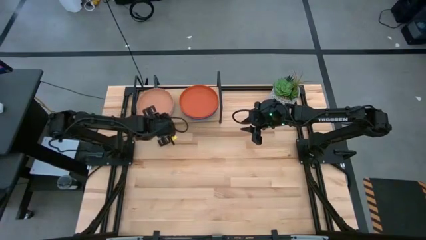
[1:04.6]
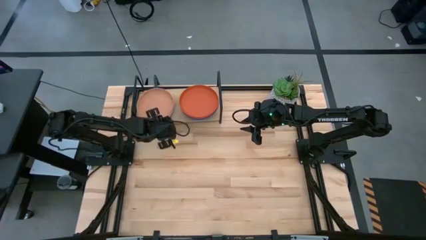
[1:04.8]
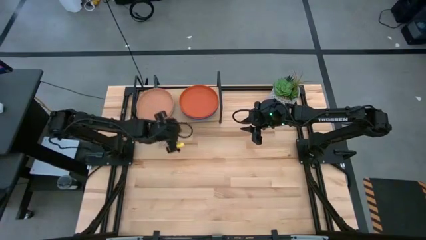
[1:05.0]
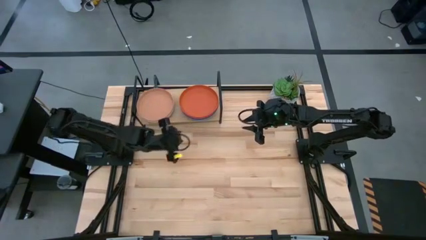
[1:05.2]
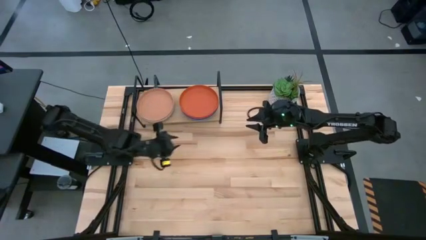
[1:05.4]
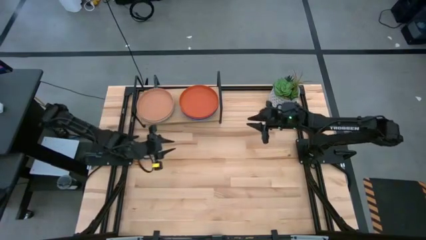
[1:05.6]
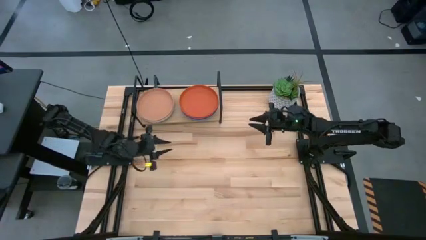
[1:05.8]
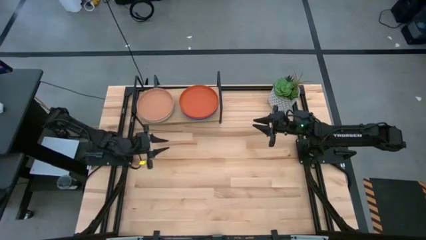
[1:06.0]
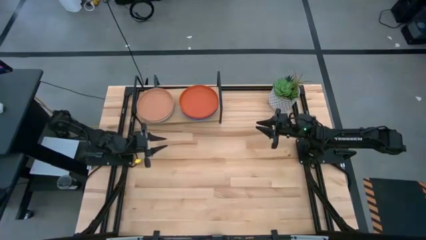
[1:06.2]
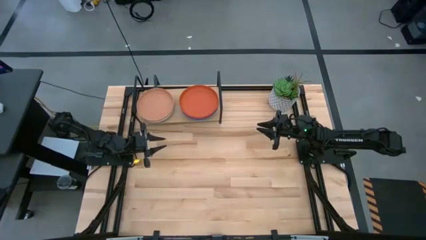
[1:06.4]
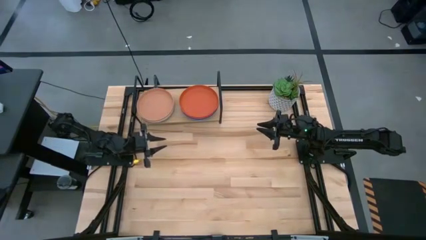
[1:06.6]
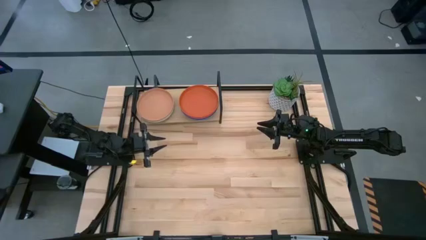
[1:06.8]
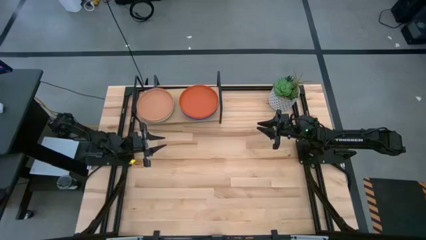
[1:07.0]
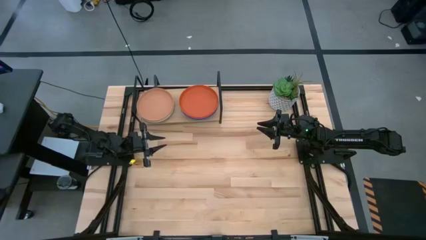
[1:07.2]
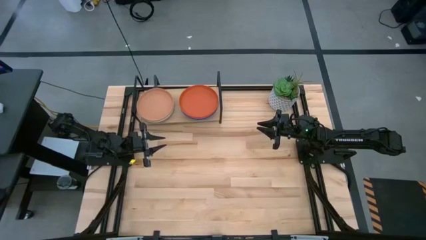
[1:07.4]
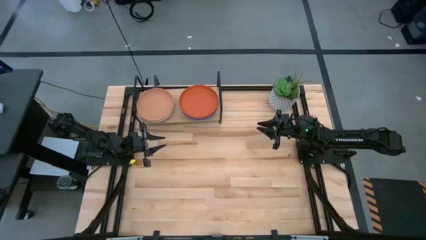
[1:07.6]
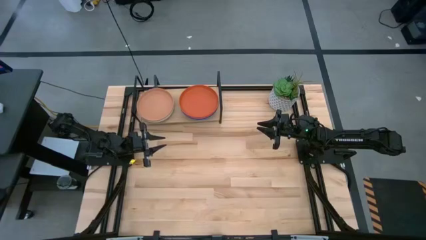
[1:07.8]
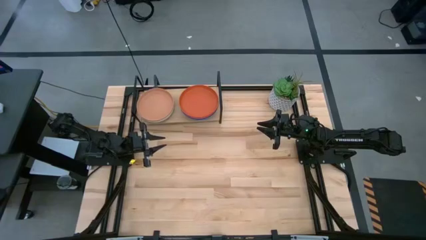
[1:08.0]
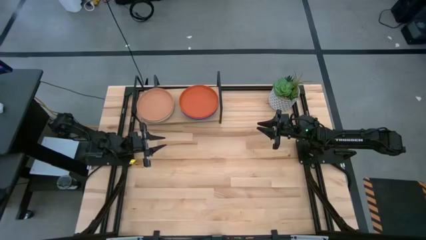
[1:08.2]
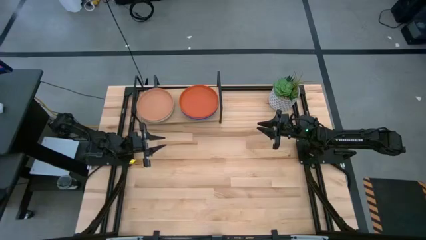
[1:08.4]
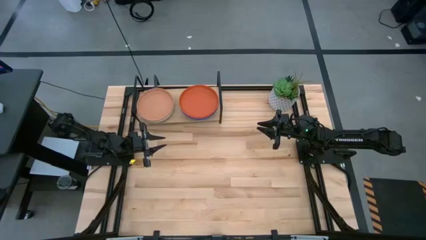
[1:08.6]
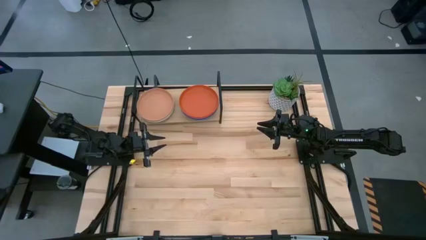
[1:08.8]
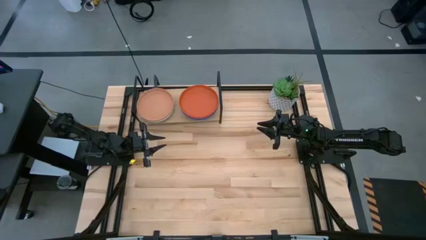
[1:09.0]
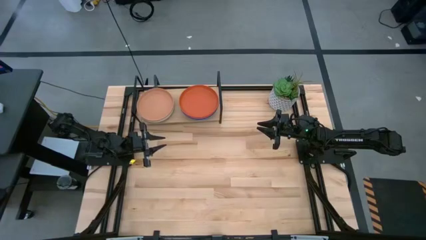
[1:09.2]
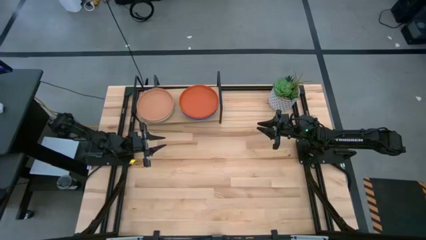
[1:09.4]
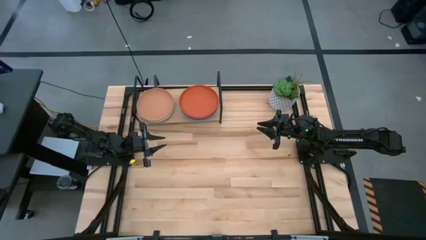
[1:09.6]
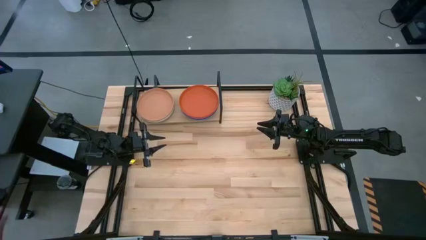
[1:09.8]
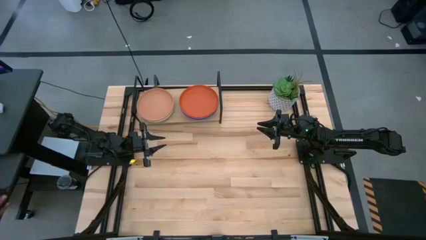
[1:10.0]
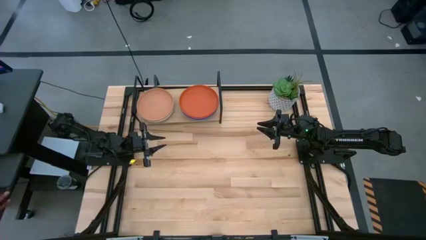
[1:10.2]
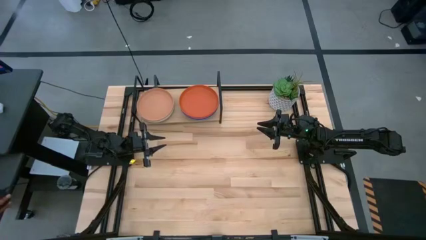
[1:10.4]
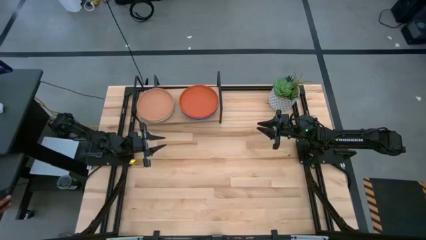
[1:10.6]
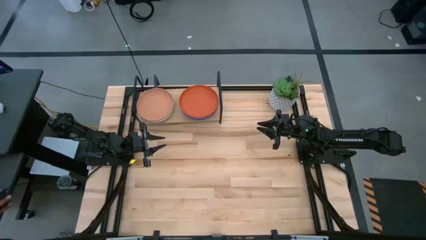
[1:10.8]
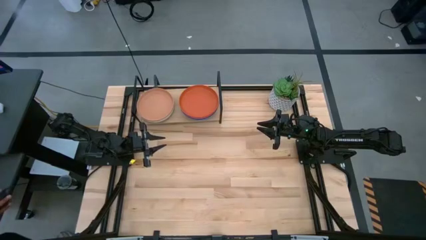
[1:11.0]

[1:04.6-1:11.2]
Task: Place and stack plates onto a shelf
Return to Home Position

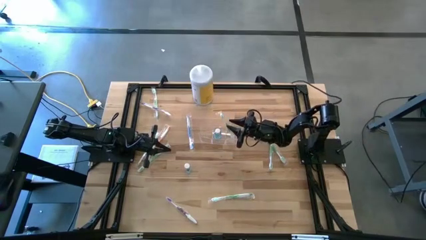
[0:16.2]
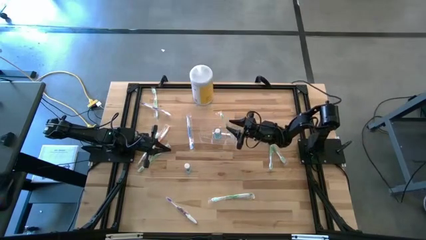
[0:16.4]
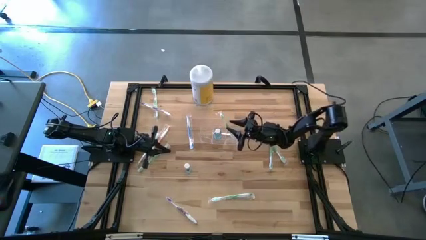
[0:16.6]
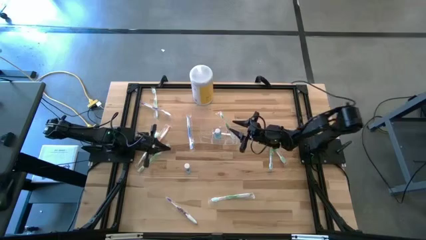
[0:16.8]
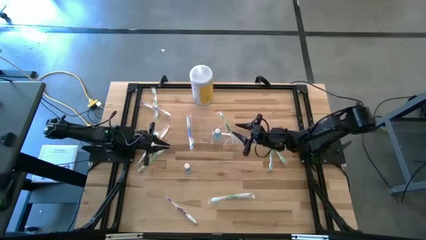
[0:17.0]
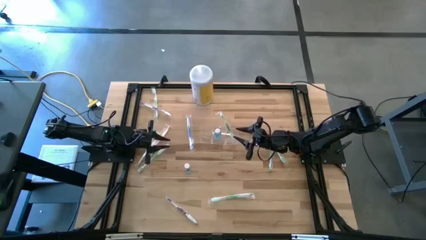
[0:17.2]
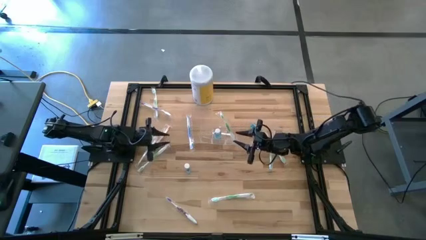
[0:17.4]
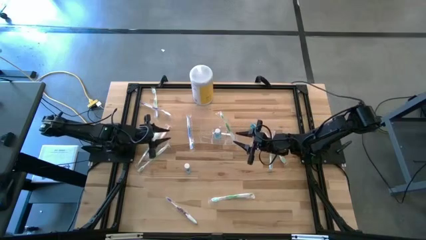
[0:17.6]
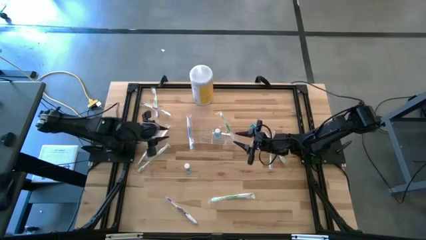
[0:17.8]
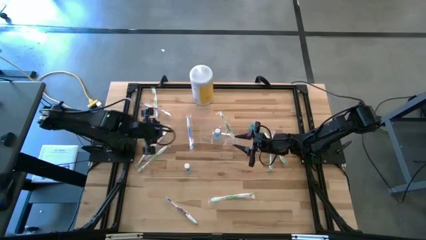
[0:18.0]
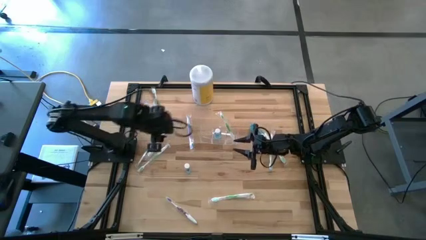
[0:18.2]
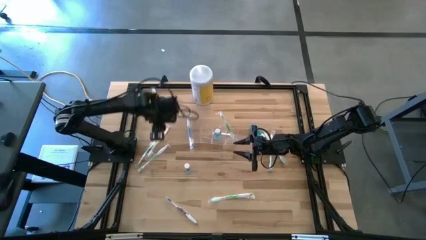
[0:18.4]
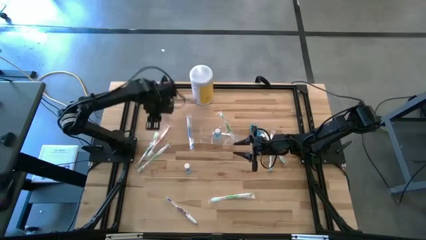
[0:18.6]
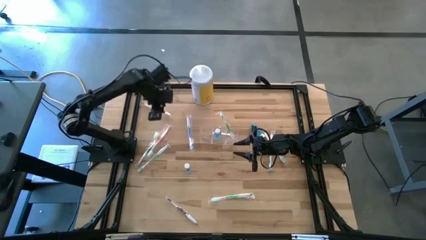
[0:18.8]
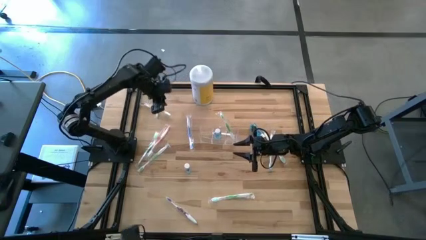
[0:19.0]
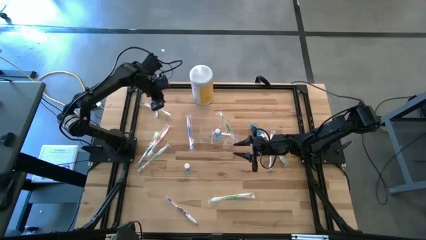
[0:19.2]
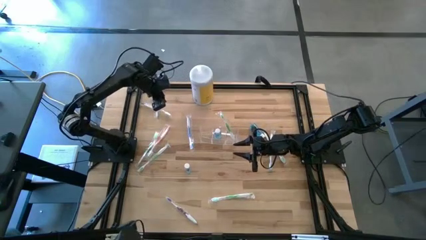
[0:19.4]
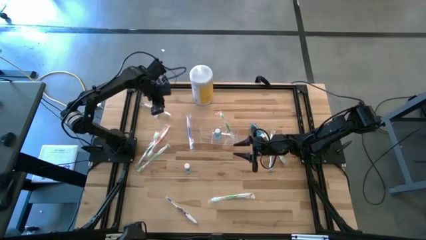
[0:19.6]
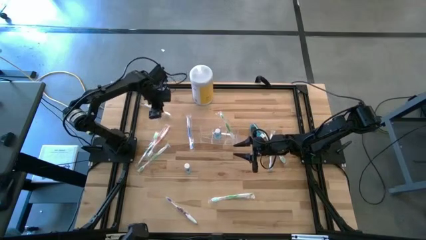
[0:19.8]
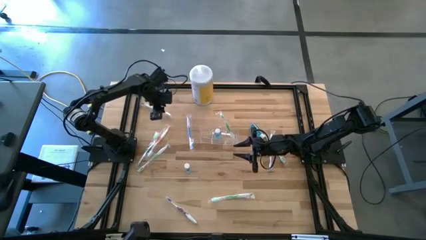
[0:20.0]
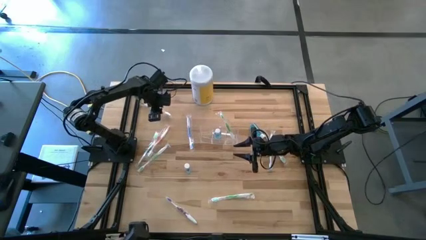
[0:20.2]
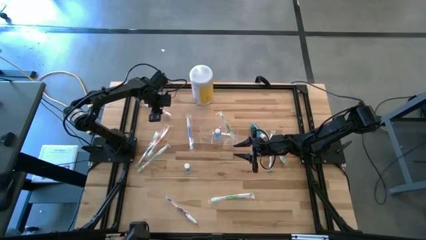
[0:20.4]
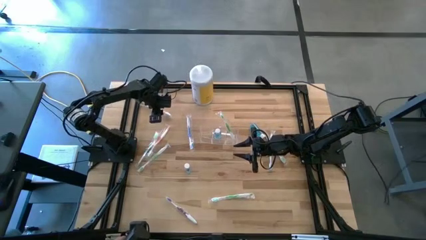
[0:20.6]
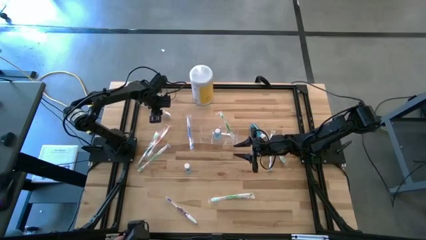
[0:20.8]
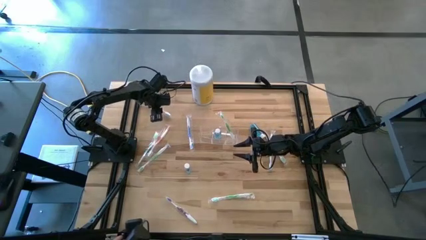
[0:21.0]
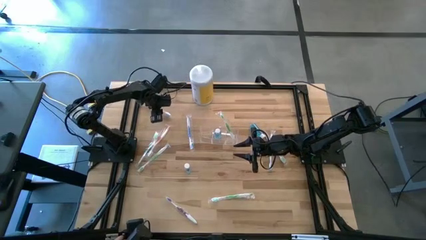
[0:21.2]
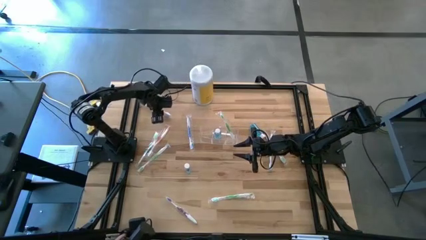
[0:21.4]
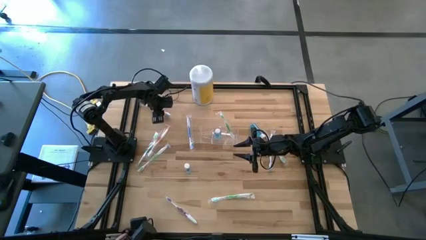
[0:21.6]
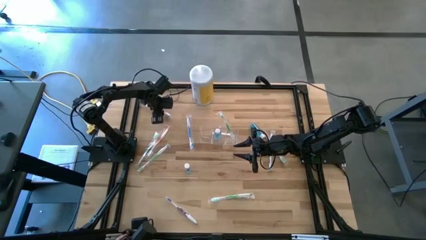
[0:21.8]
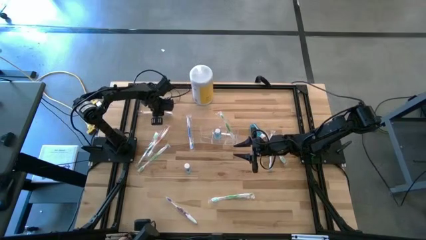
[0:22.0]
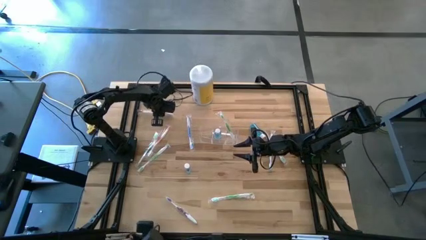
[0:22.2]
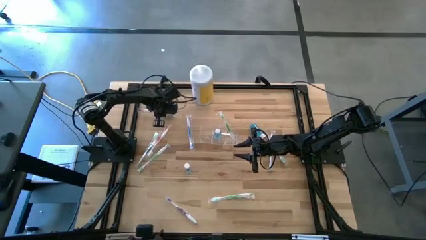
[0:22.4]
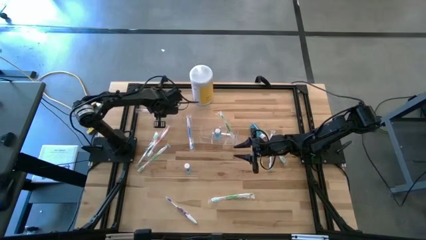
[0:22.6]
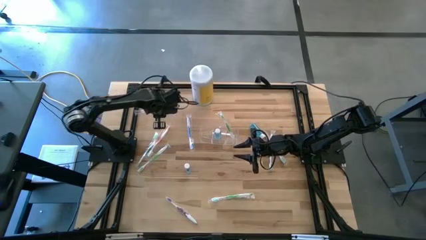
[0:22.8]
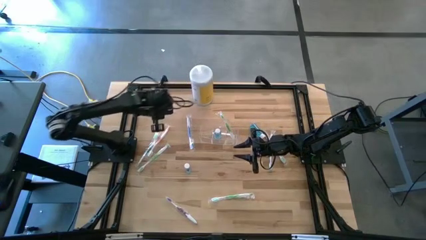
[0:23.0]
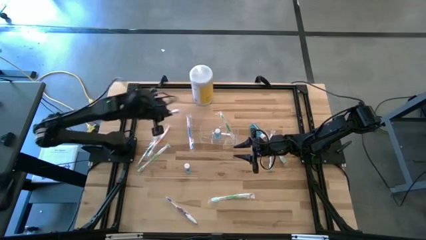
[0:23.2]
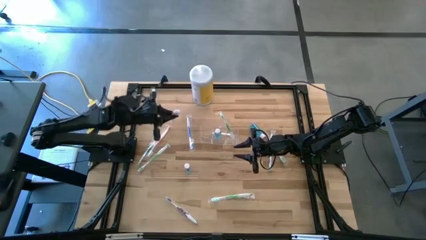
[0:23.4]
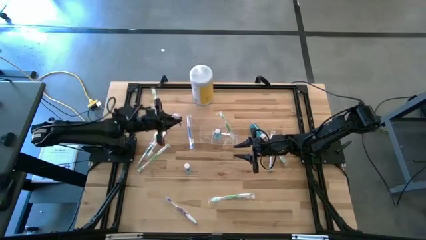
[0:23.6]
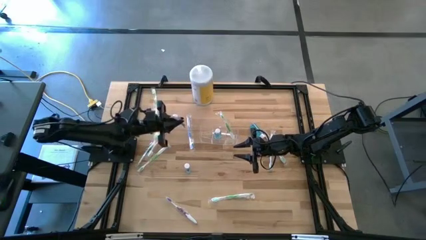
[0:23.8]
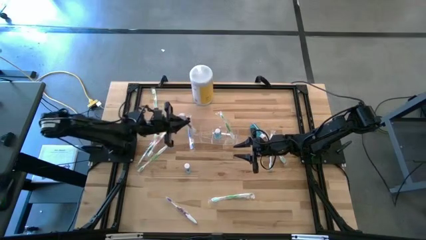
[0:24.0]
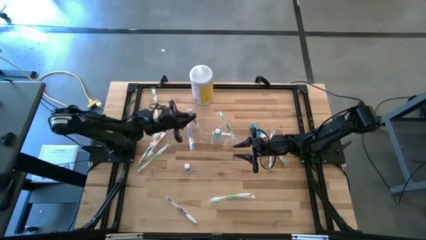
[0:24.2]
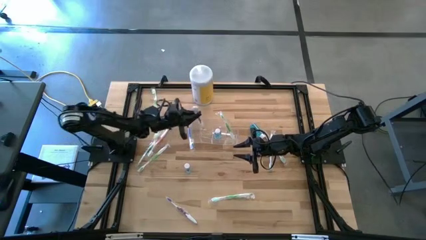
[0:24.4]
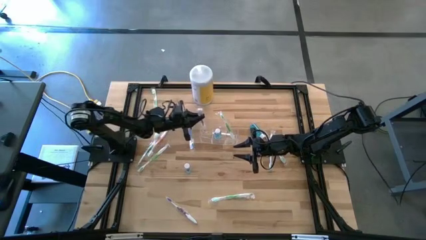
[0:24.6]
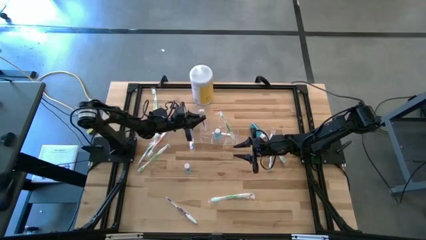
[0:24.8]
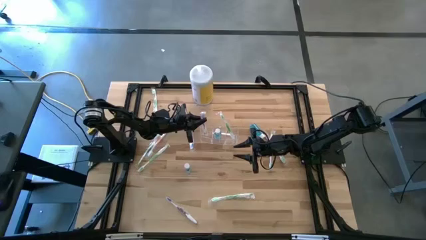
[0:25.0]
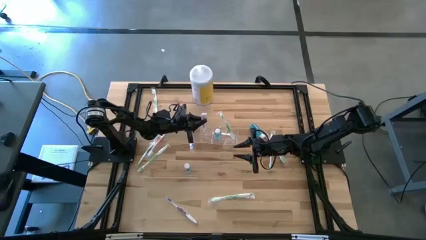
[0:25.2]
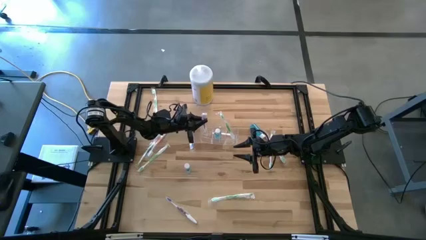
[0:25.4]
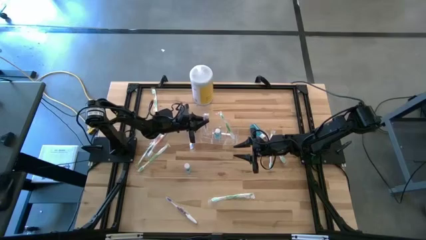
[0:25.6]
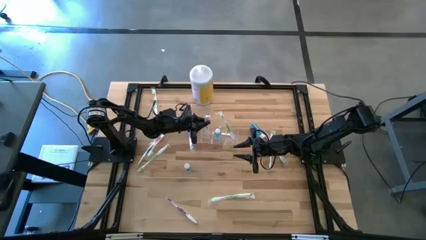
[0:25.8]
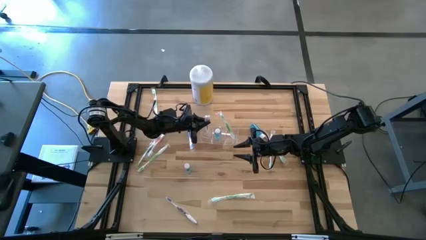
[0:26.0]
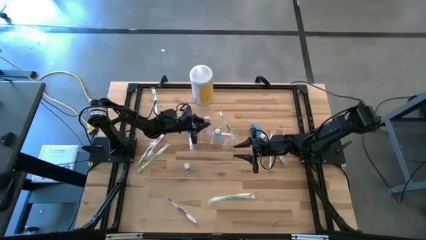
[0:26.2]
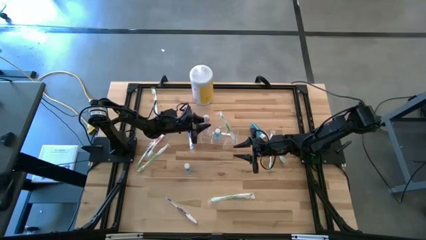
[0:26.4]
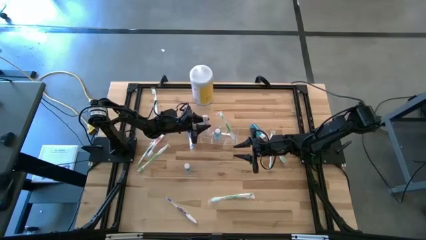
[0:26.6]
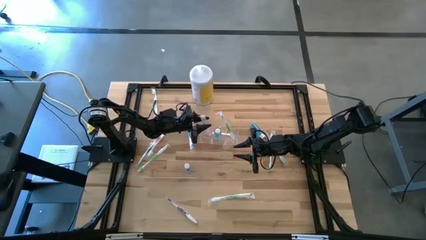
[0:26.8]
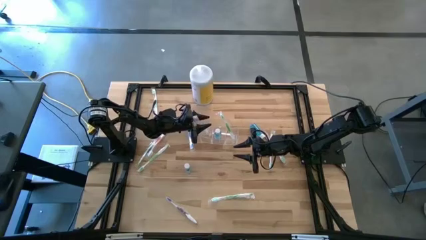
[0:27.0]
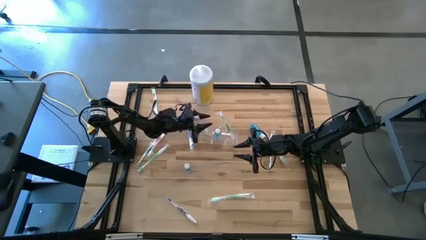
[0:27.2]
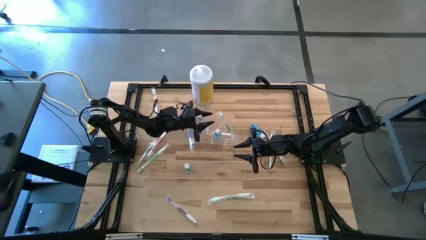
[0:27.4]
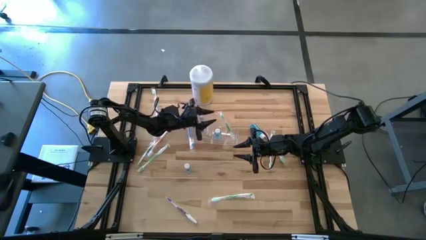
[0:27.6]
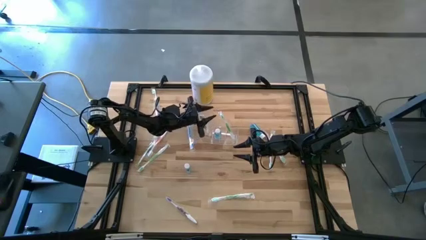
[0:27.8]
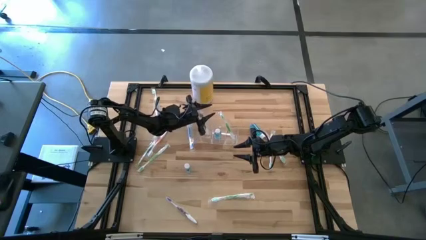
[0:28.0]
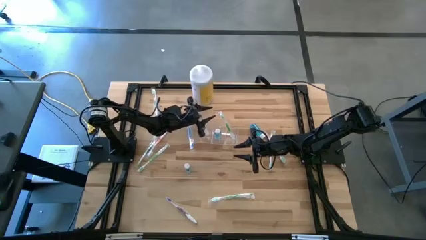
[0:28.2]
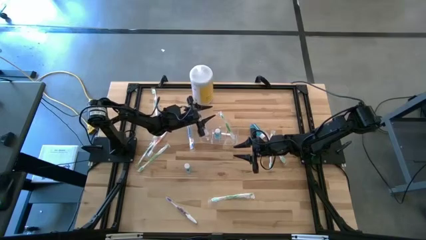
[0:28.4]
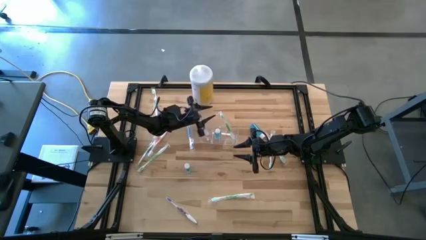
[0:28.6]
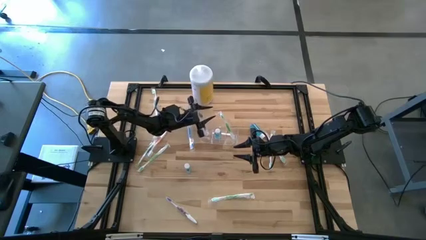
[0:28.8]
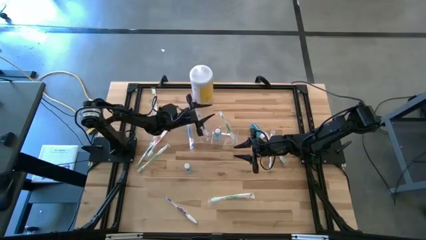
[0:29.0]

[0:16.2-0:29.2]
Task: Pick & Place toothbrushing station
Put the top purple toothbrush into the left section of the transparent organizer
